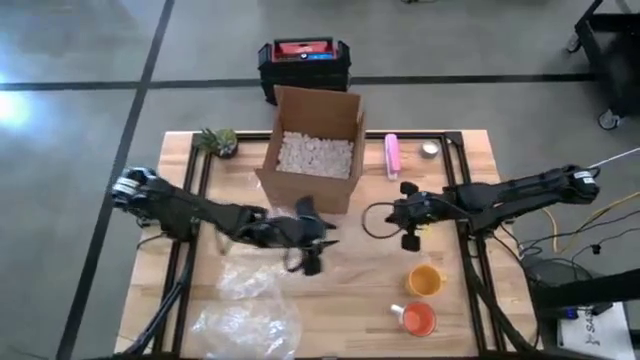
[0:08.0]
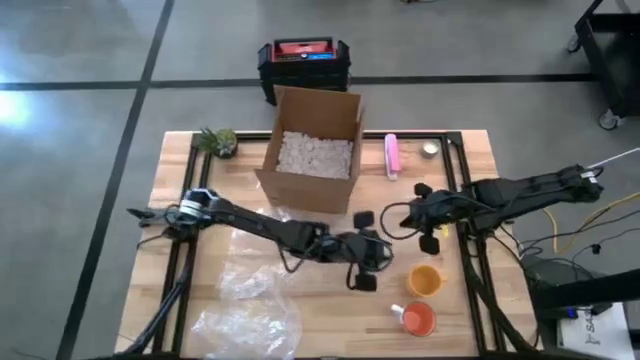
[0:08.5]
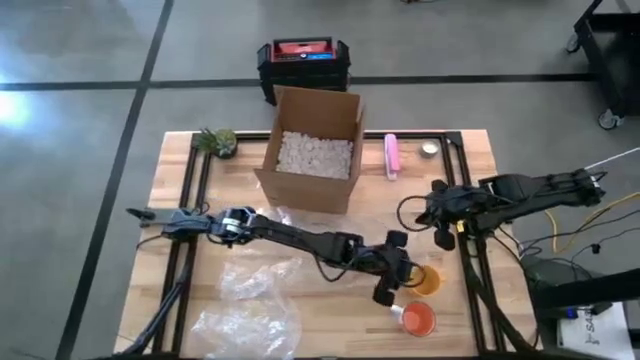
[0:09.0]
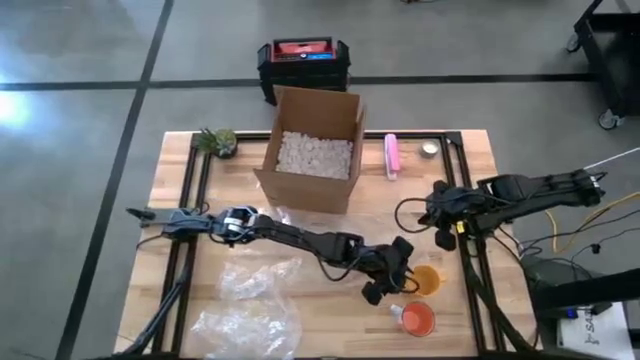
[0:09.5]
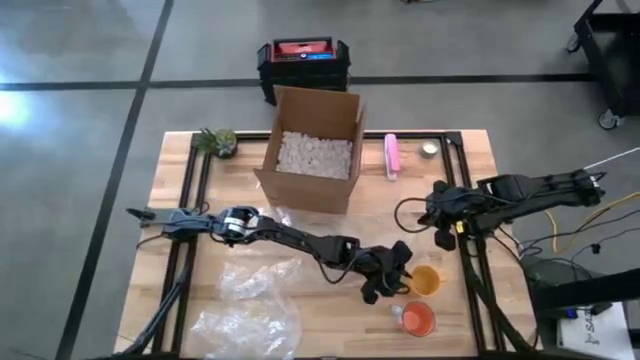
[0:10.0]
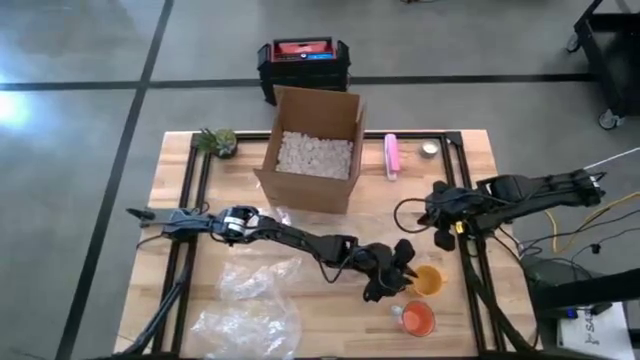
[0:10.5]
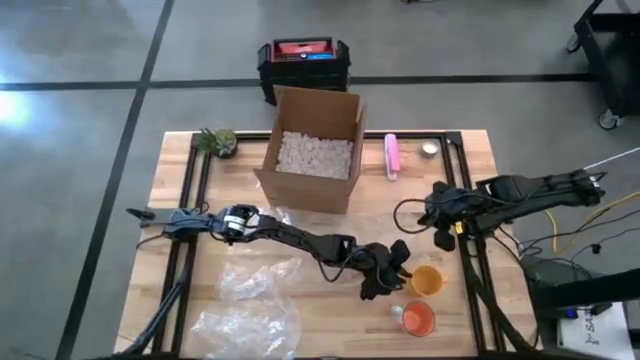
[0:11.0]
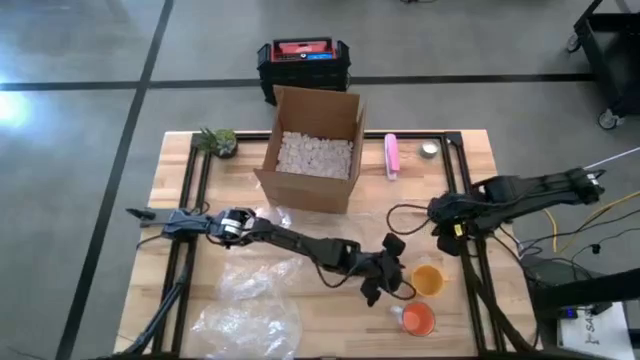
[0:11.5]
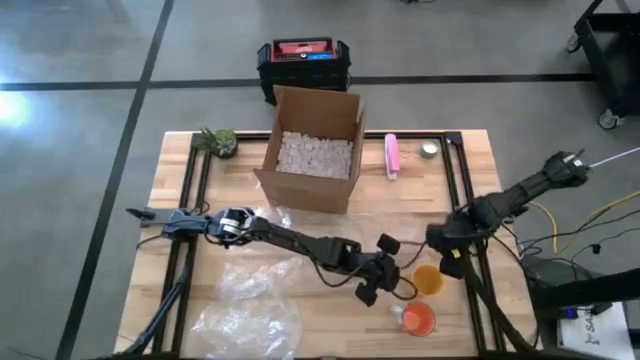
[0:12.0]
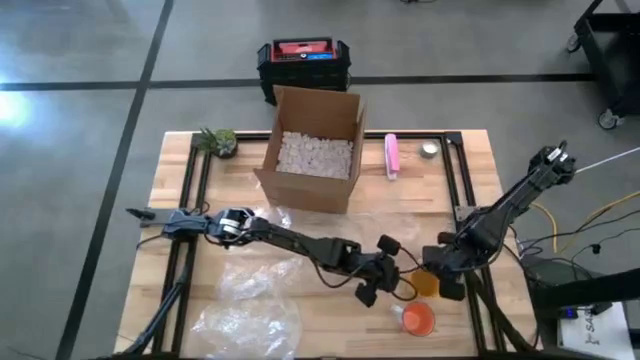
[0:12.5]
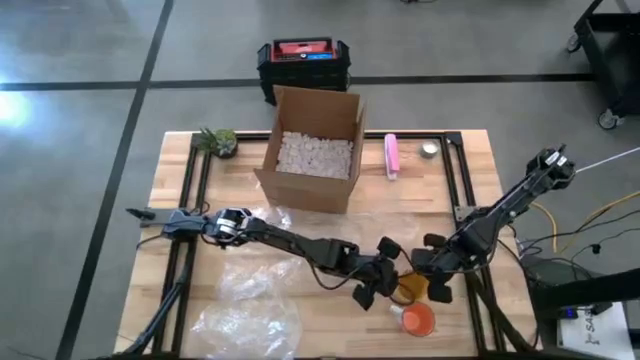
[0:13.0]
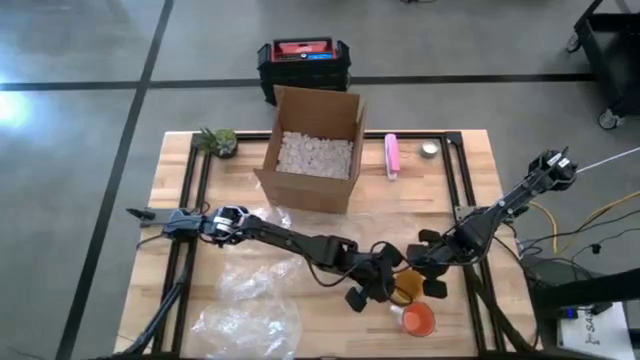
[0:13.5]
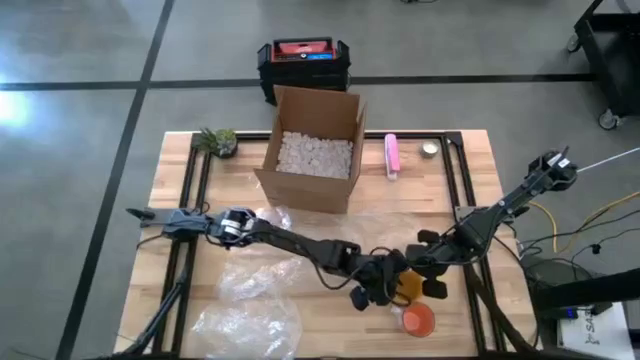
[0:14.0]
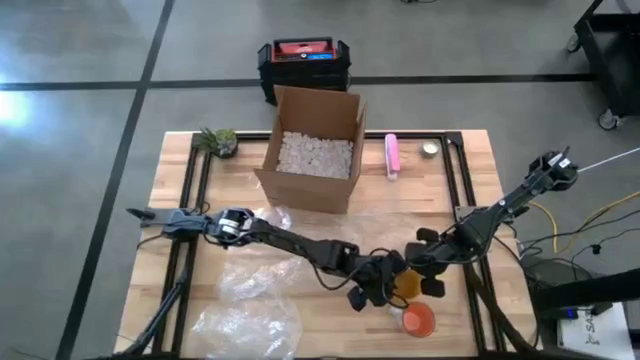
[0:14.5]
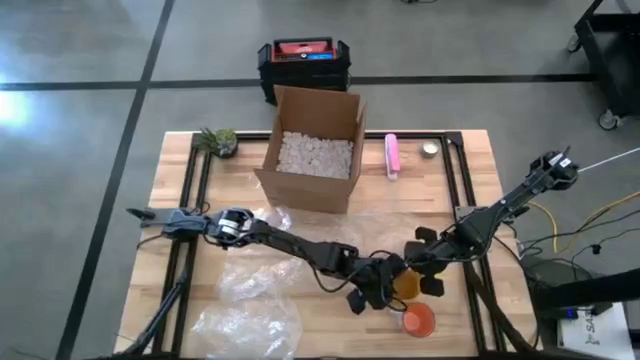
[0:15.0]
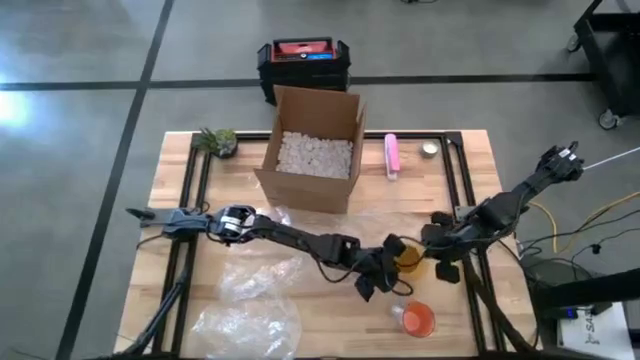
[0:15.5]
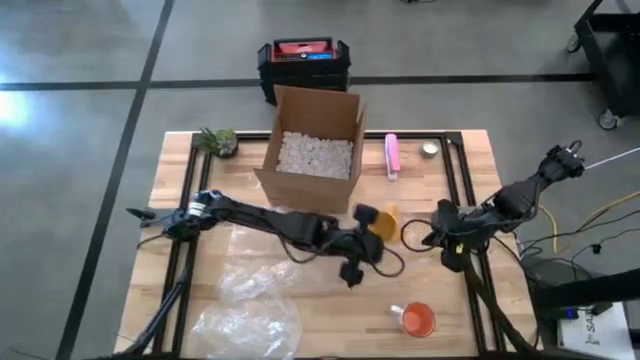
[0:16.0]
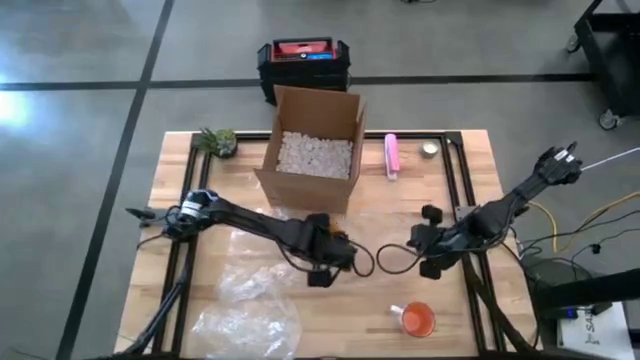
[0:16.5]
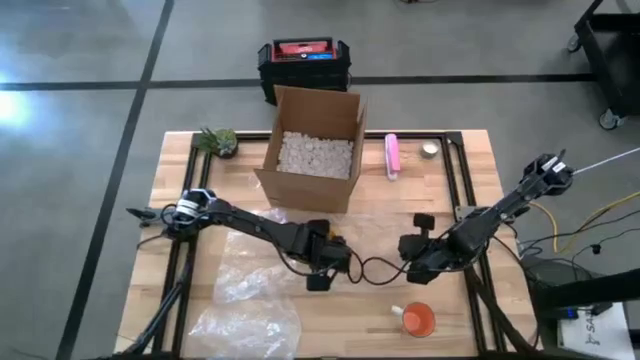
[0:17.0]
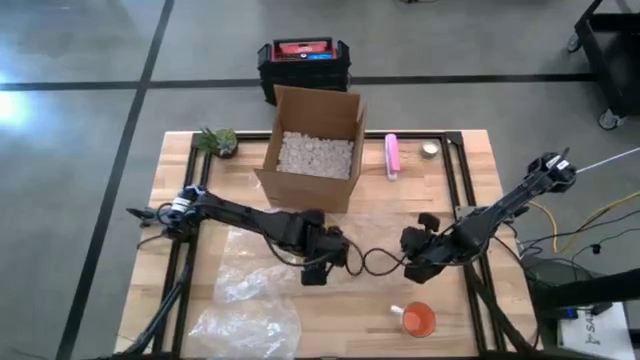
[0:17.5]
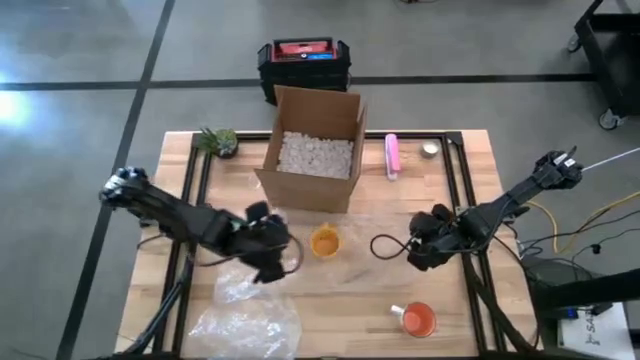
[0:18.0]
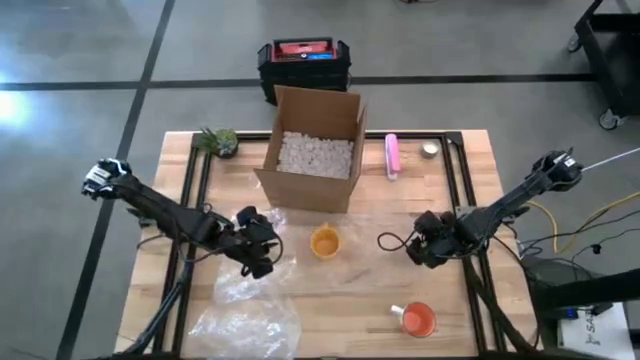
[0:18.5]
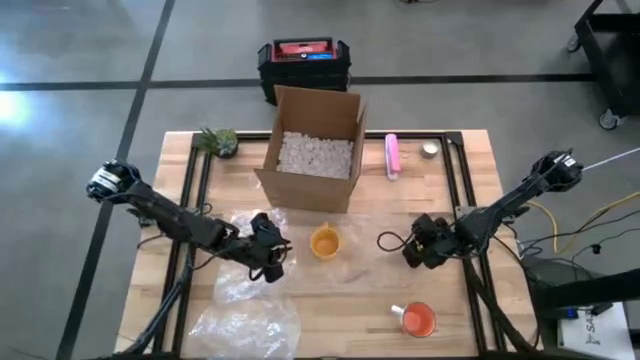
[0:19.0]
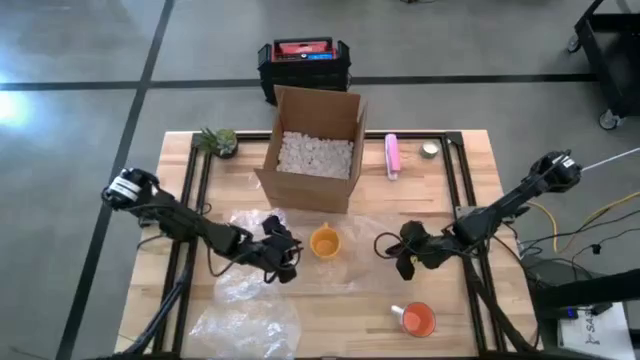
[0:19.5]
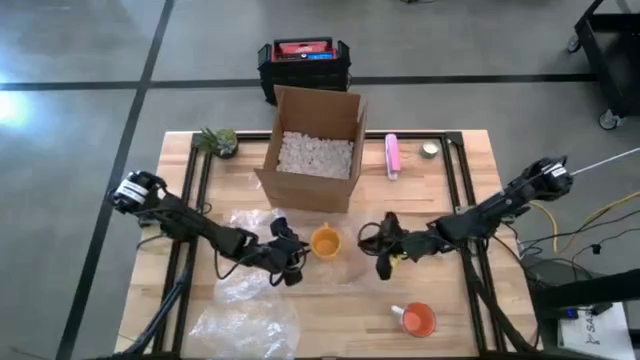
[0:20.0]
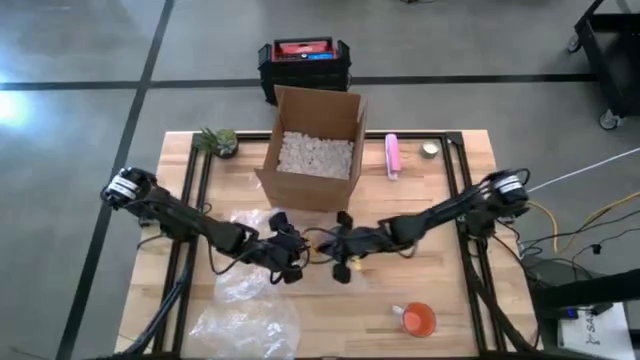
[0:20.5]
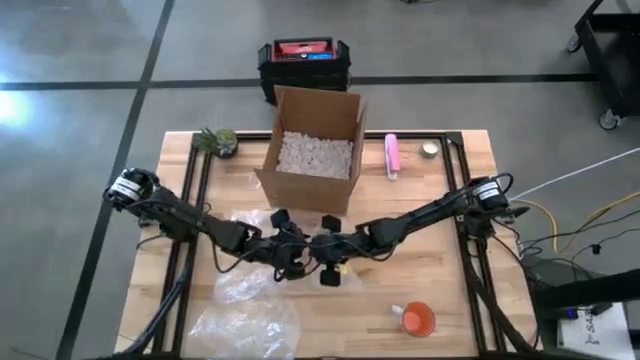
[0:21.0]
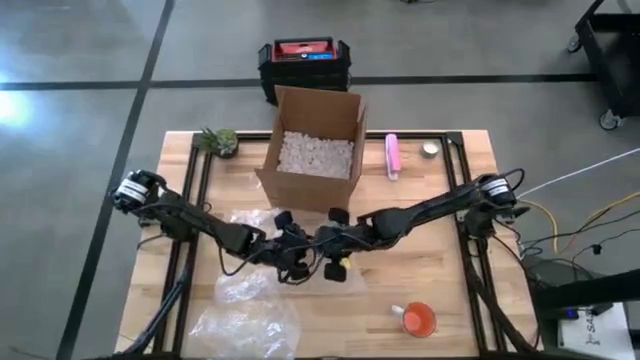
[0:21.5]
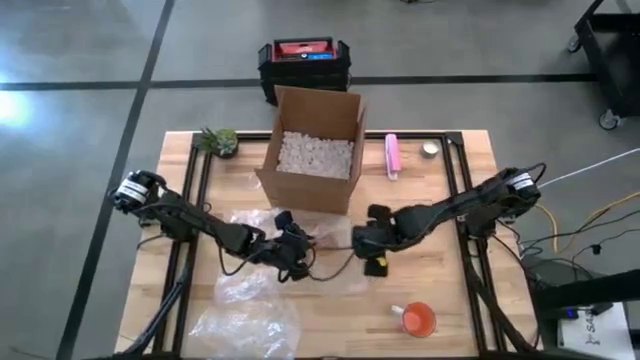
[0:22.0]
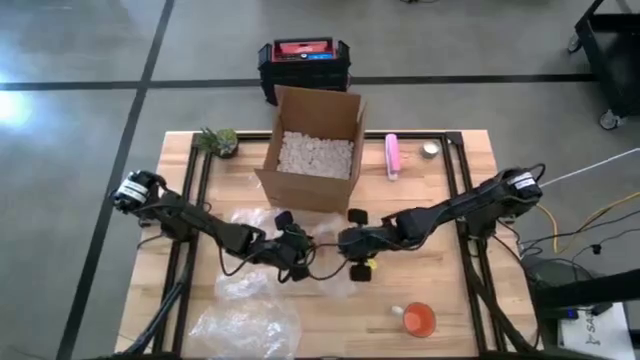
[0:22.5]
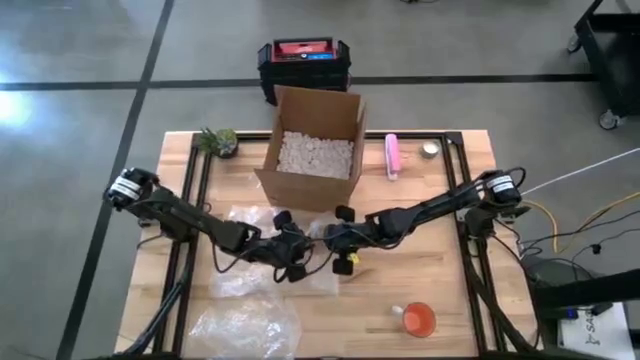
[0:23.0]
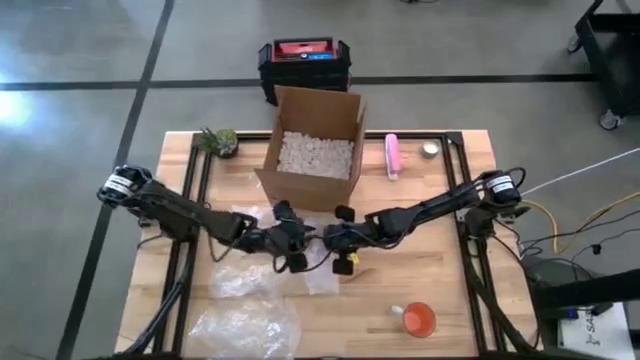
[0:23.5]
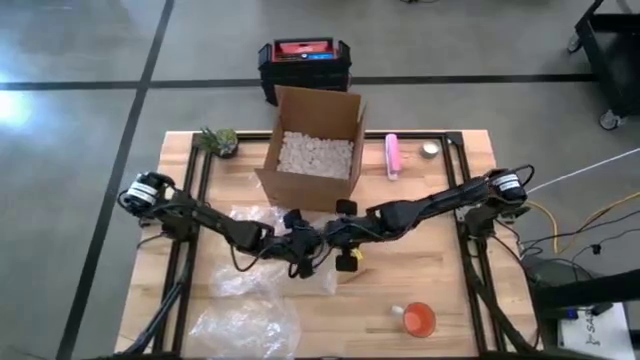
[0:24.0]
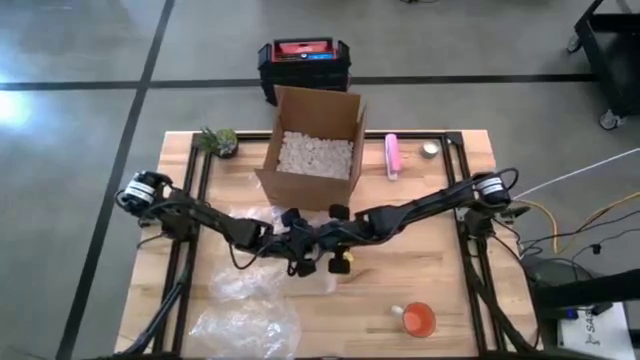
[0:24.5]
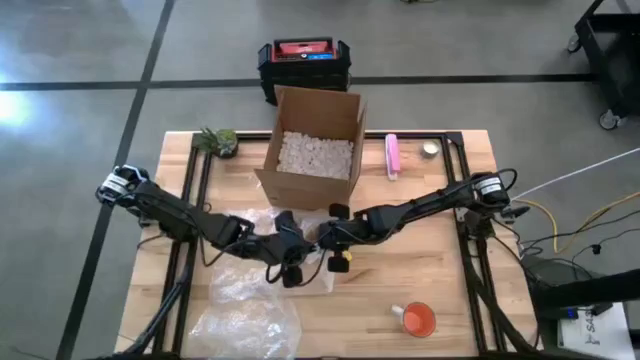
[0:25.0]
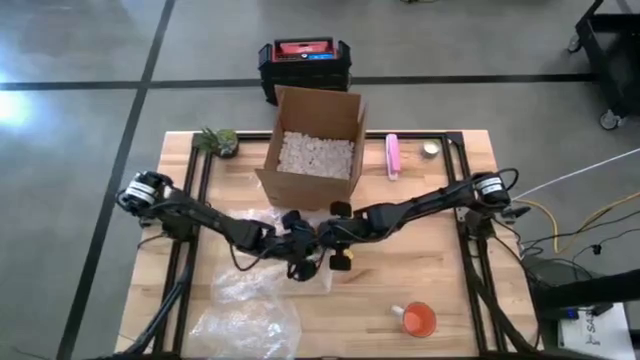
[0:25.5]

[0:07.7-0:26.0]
Task: wrap mug
Wrap the yellow mug with transparent bubble wrap

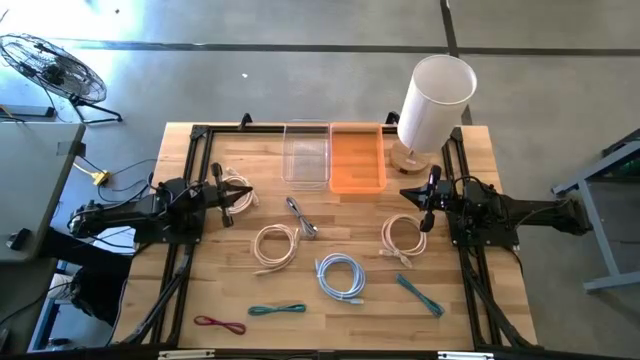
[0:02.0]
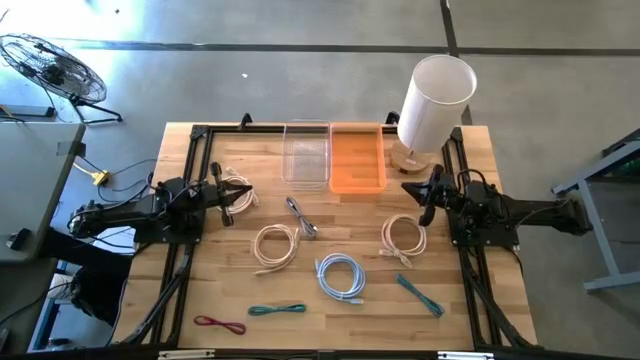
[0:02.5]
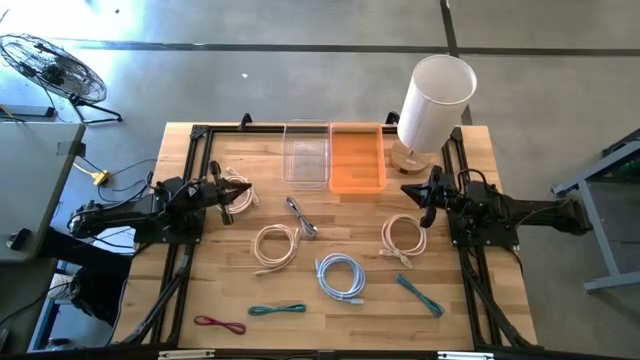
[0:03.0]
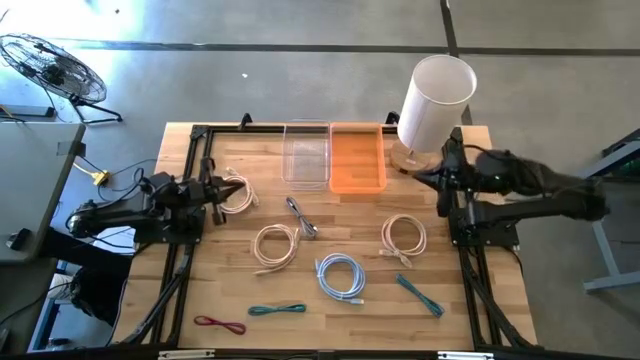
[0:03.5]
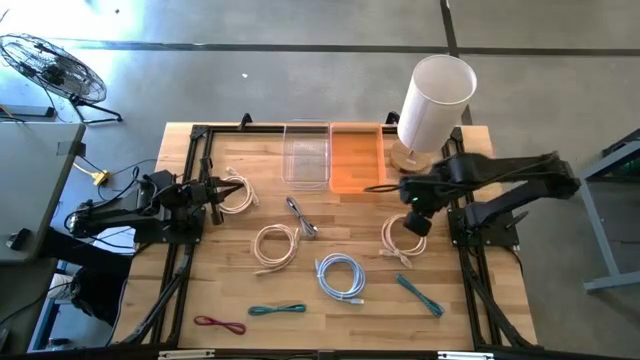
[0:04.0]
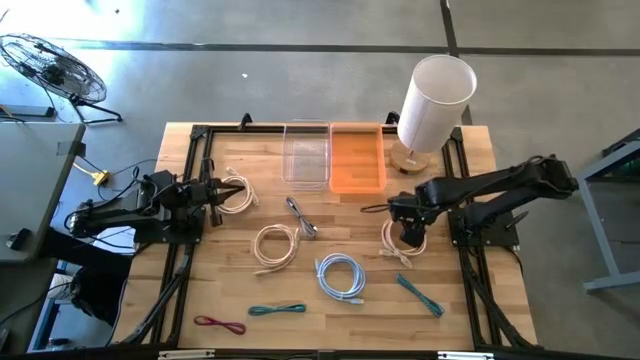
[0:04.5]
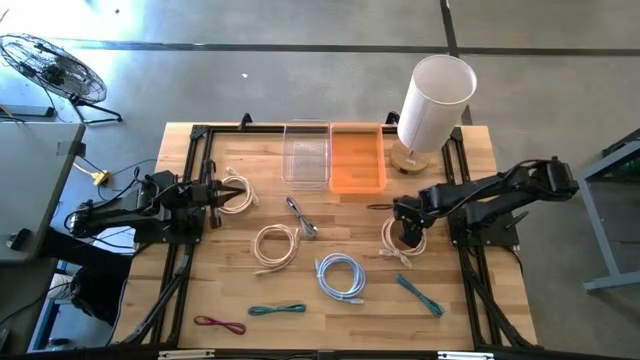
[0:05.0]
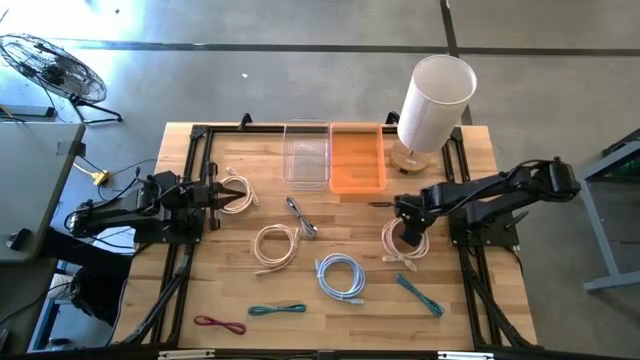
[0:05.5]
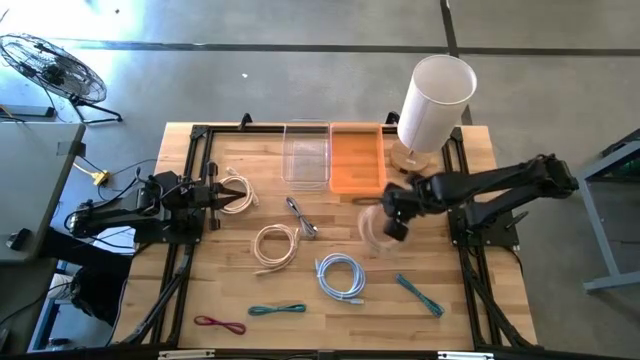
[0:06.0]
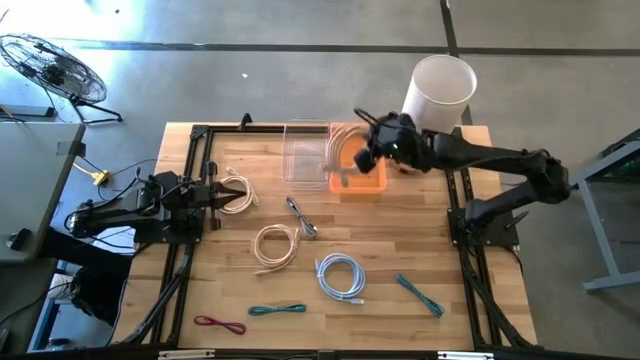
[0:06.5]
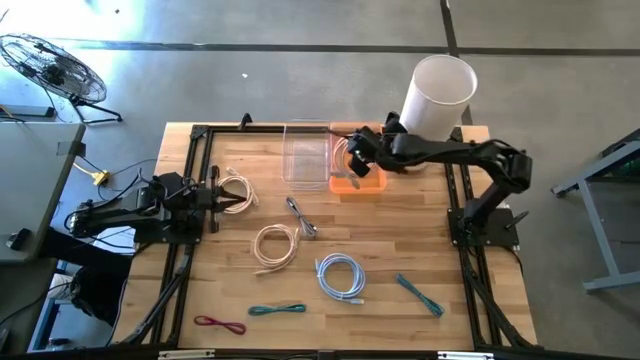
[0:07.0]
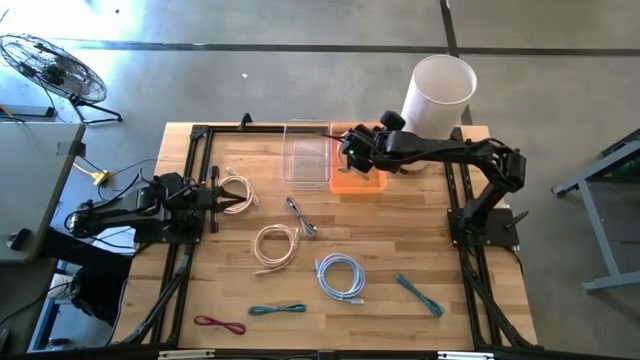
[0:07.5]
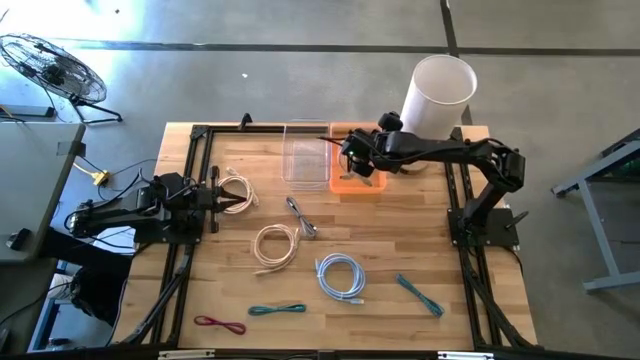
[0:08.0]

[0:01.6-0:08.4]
Task: Pick & Place USB Port
Put the bottom right light brown hdmi cable into the orange bin
